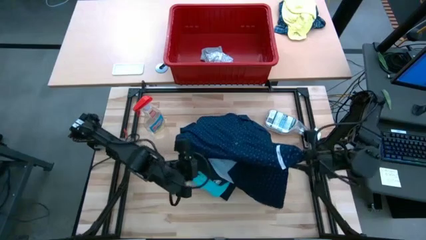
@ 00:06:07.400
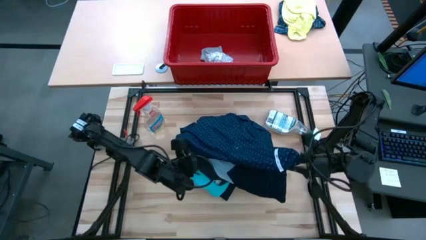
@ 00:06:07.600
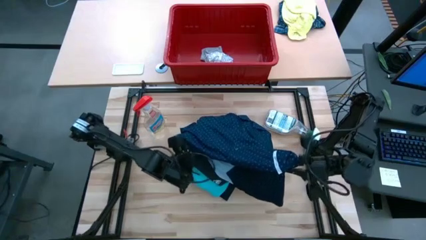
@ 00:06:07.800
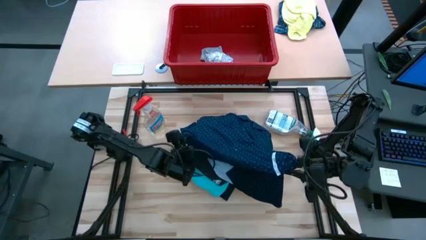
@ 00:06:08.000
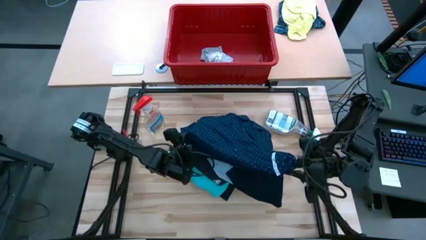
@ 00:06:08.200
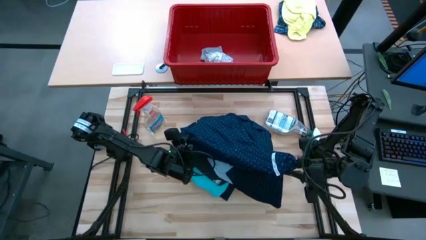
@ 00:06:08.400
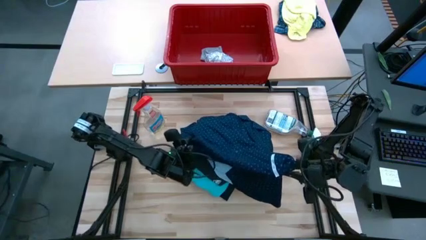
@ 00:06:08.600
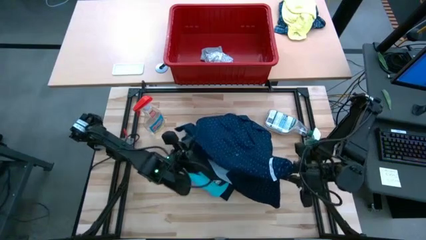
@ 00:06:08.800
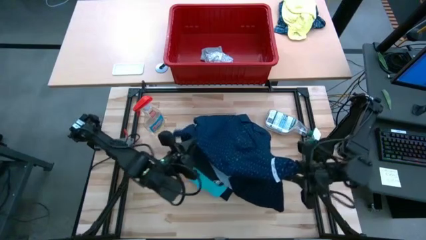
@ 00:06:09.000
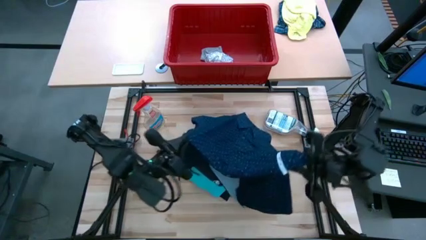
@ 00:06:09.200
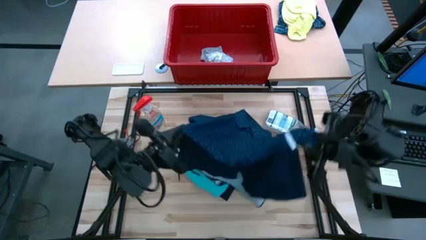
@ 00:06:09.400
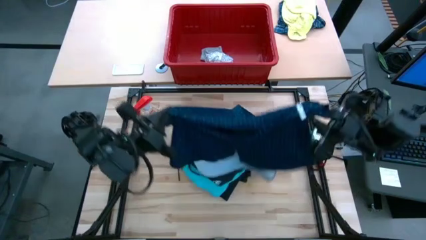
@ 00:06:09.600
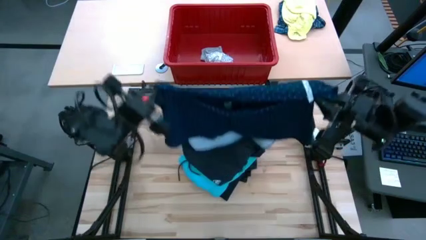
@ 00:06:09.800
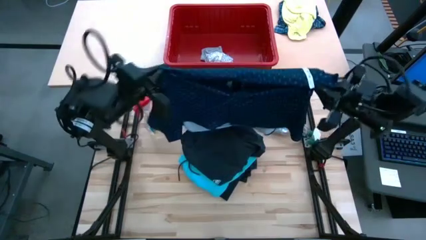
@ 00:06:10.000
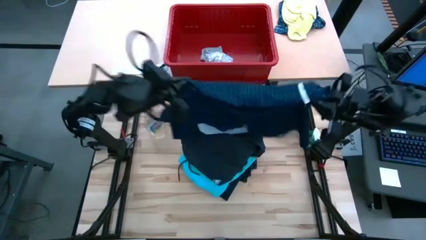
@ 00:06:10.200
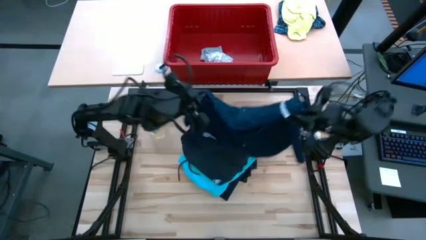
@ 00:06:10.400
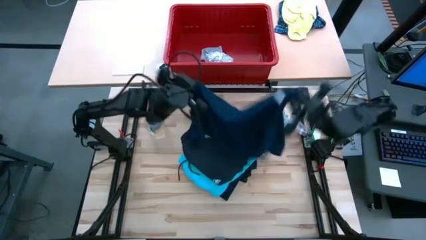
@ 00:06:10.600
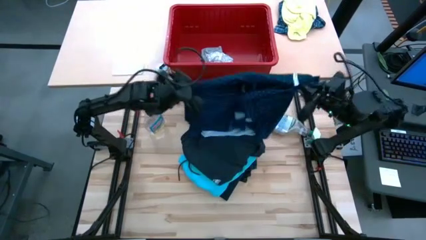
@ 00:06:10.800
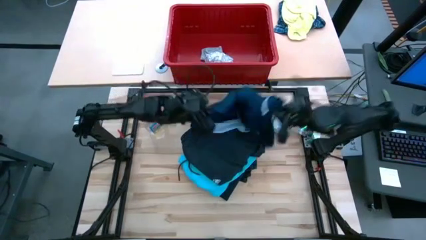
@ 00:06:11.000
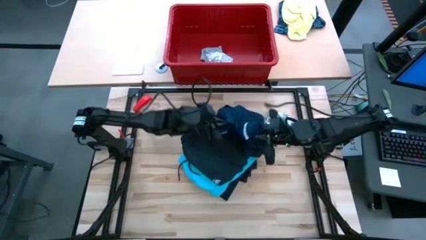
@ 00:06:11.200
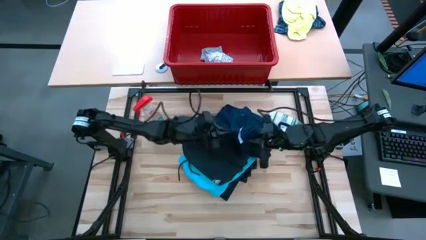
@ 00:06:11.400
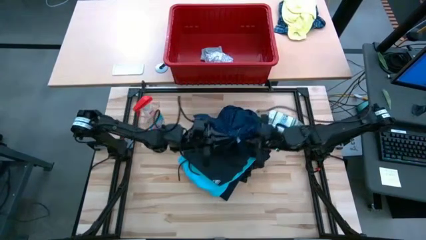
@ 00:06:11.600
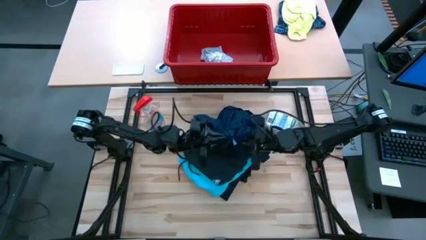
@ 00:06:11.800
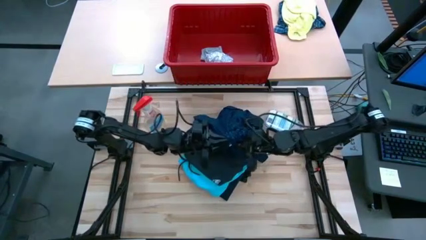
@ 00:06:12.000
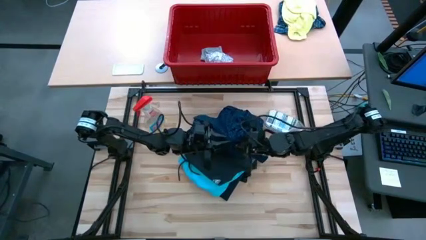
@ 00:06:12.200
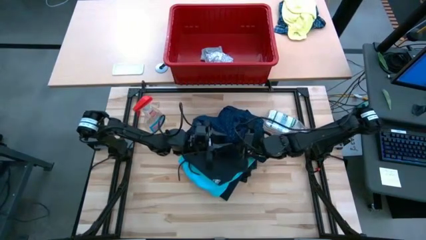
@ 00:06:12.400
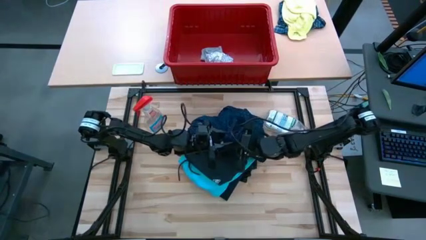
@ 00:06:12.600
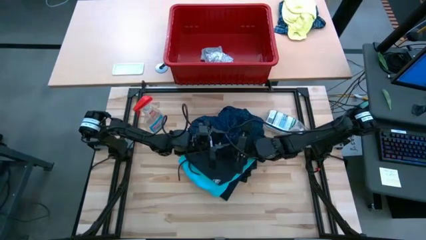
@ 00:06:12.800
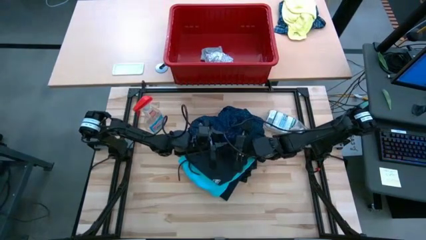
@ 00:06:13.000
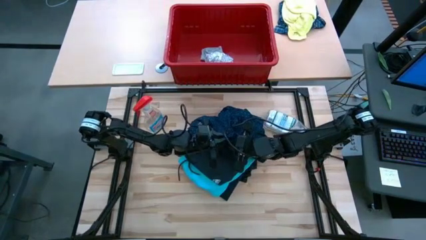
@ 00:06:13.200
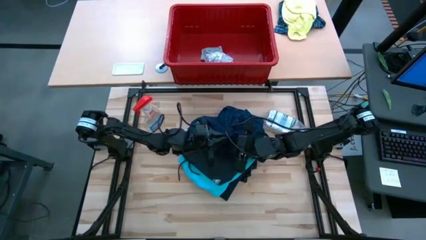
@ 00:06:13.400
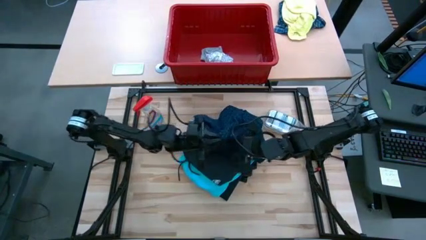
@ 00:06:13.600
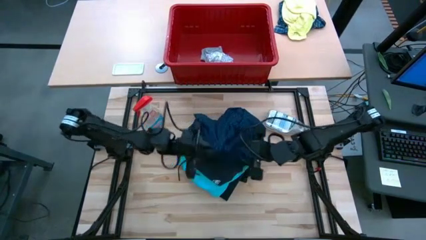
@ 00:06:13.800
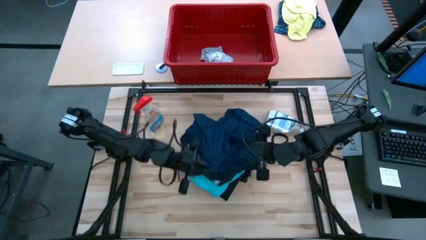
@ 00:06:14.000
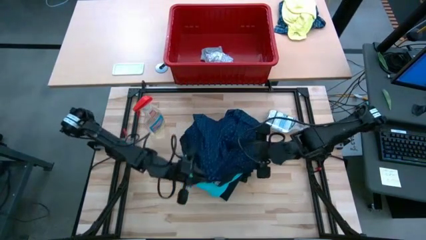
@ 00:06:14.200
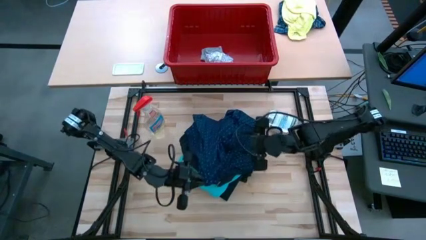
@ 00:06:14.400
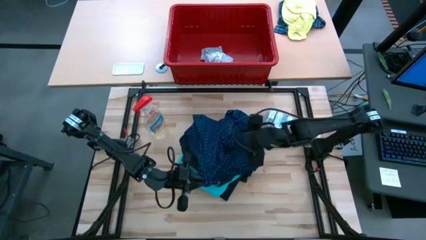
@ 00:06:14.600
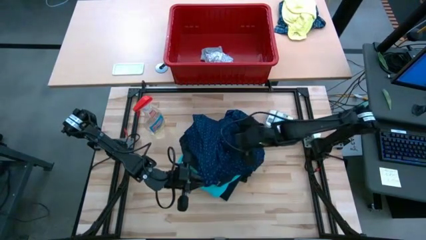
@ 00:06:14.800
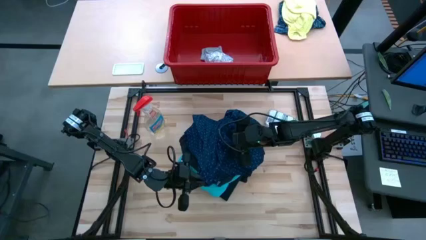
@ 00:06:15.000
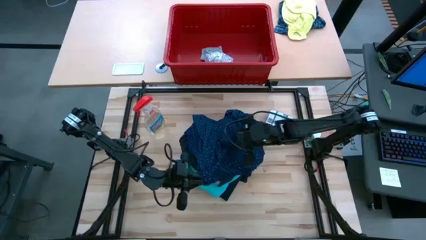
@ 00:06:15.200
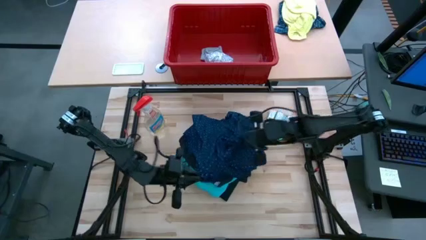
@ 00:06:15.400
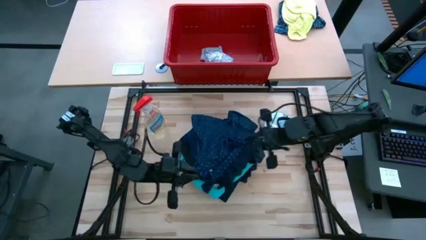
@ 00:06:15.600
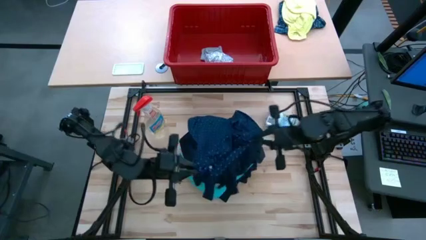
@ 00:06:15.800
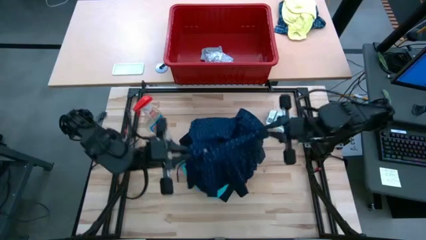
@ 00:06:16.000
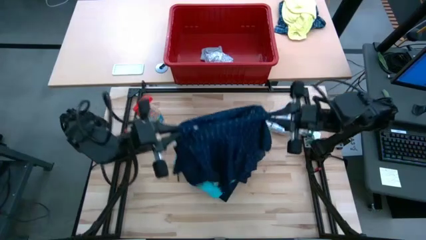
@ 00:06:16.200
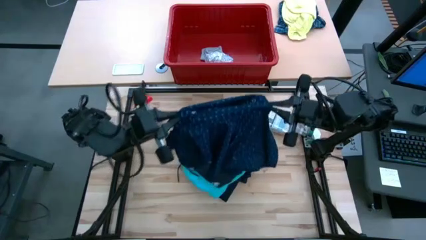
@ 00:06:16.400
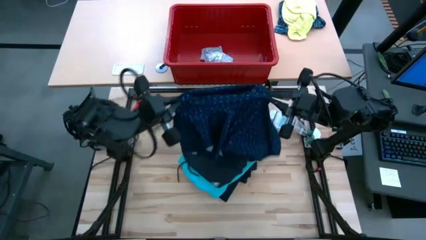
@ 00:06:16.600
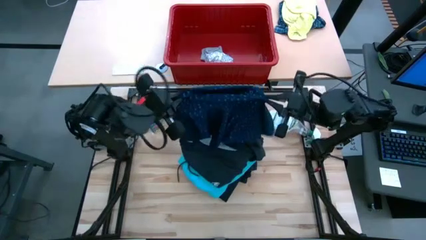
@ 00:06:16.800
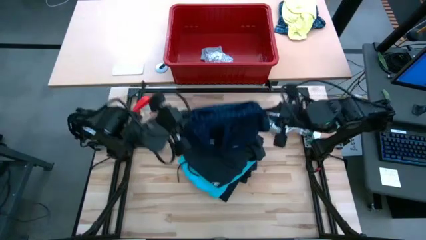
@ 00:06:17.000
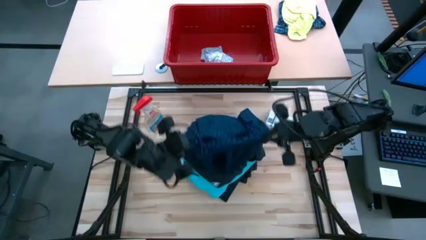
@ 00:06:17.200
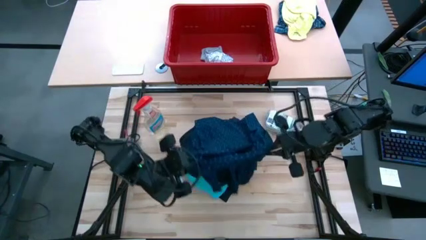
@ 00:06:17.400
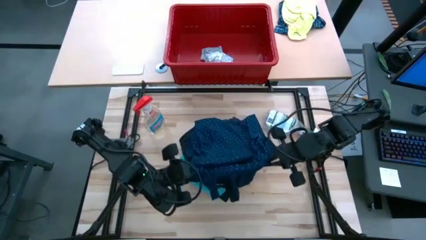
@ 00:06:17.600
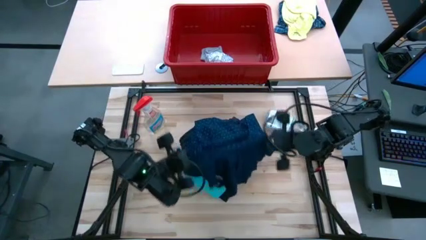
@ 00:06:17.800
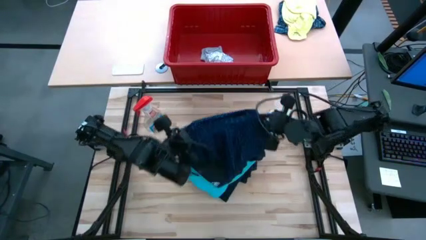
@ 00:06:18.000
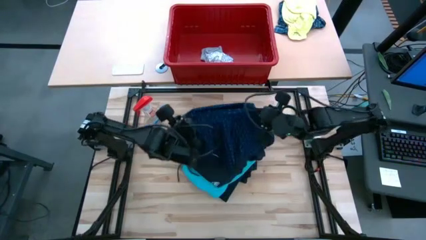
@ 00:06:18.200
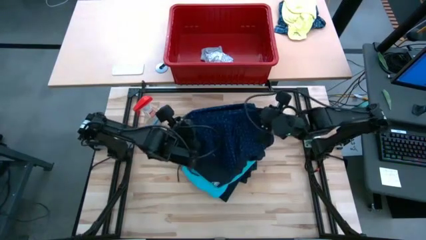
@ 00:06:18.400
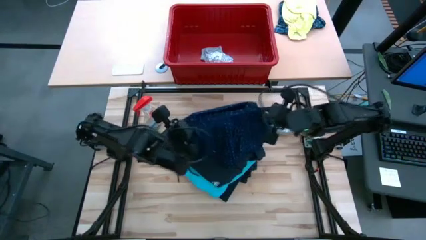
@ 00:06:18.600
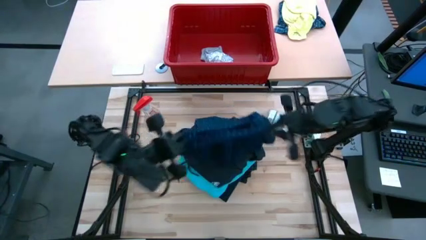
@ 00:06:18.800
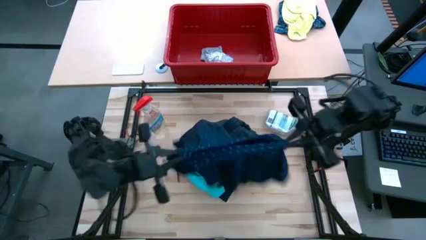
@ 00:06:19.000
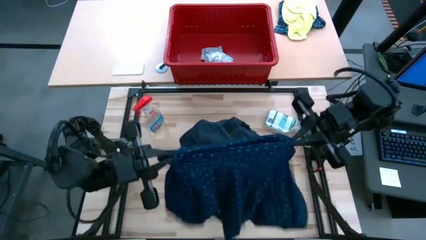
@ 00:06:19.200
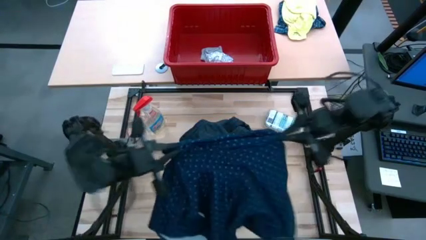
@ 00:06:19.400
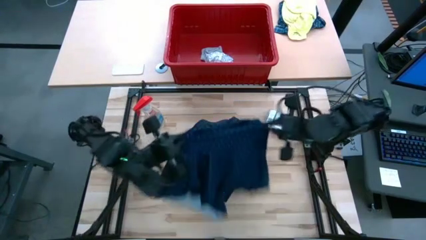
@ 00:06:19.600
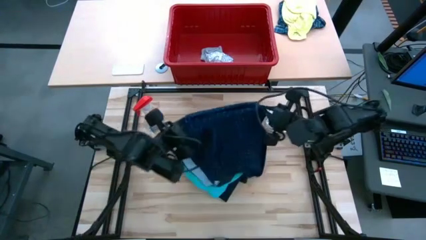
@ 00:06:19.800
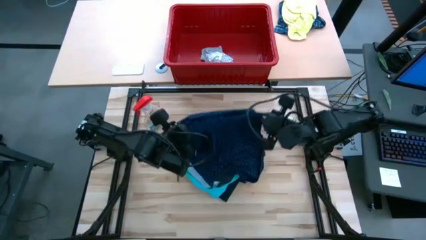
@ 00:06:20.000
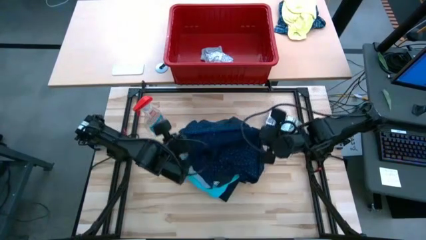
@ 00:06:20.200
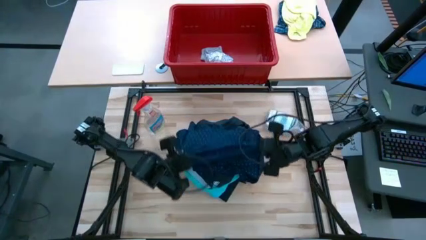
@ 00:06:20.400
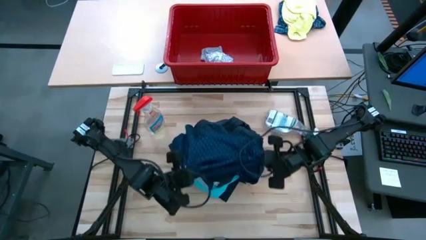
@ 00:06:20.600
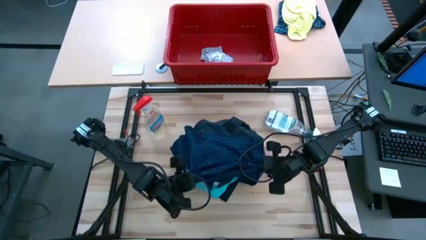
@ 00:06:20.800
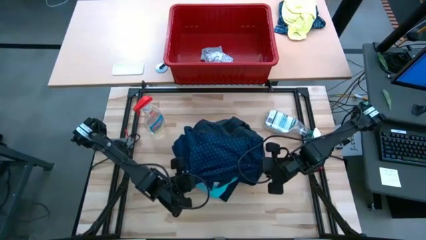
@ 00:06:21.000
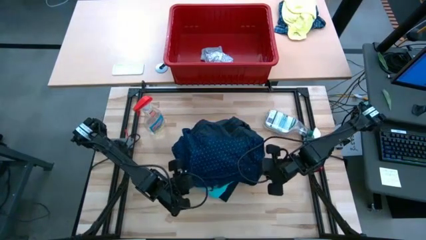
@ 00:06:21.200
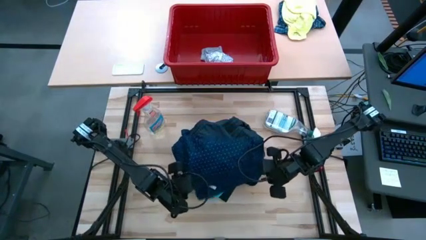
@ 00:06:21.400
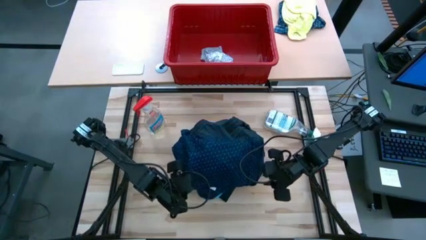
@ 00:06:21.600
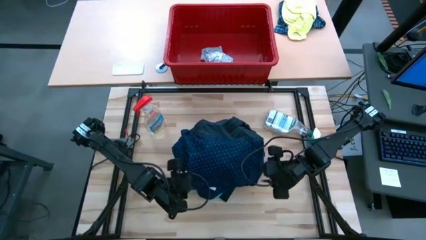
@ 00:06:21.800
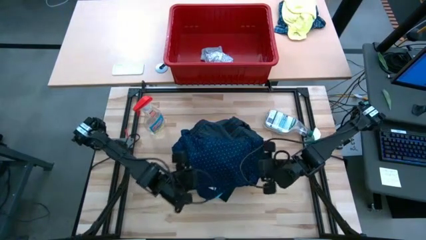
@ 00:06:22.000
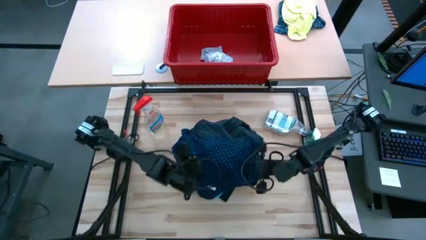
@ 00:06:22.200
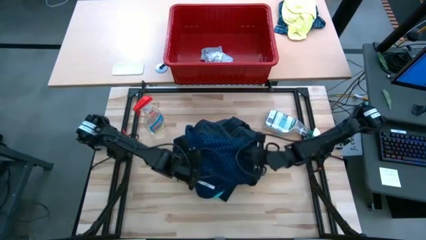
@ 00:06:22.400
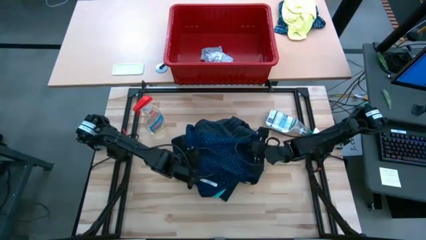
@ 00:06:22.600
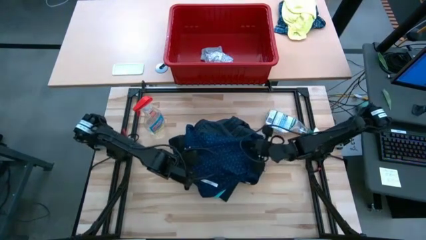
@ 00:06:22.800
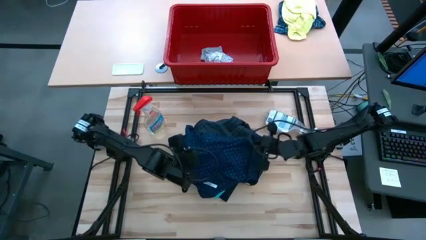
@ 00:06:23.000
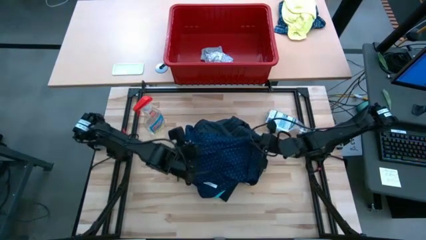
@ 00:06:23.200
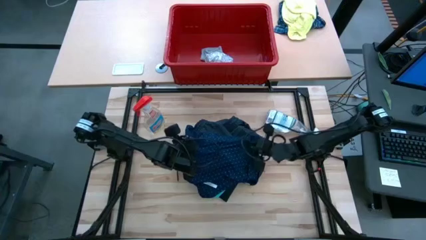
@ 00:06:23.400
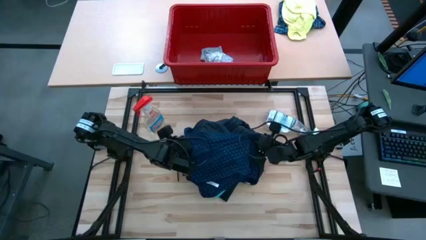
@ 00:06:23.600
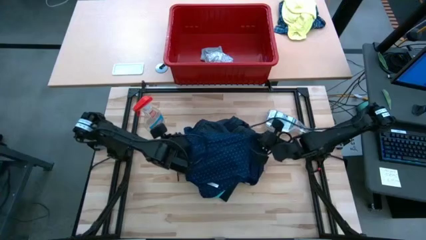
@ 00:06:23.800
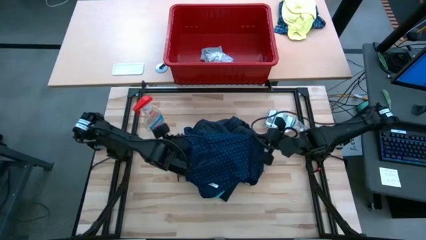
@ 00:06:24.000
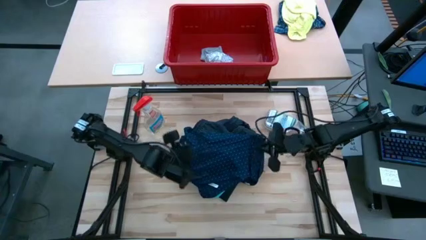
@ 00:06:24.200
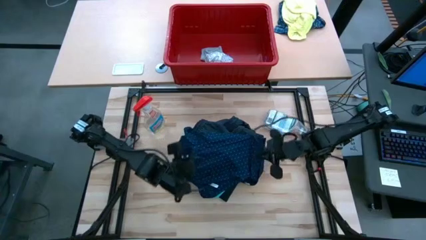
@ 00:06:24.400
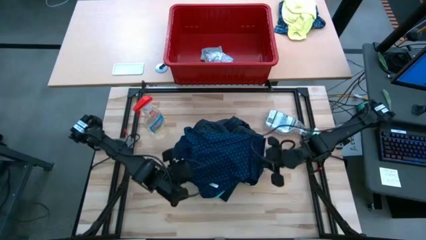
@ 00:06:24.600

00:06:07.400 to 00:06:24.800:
Task: Fold Laundry from Bin
Fold the blue polo shirt
